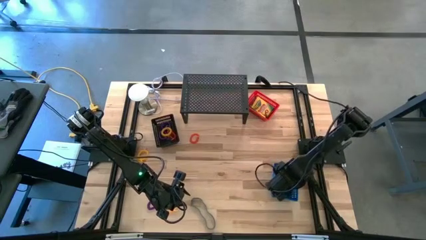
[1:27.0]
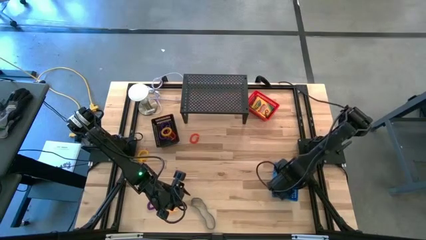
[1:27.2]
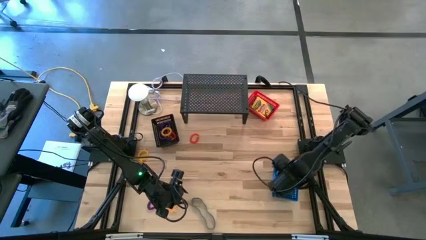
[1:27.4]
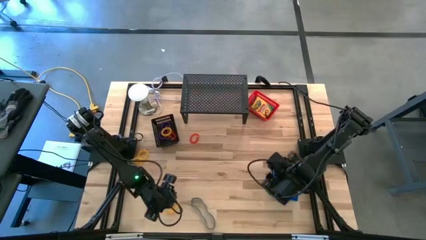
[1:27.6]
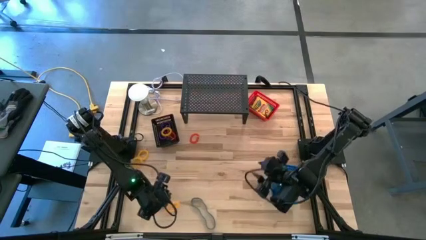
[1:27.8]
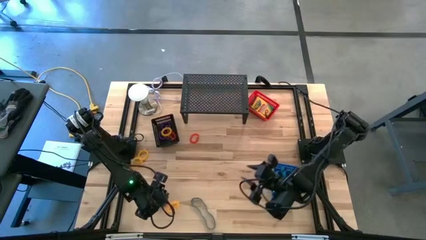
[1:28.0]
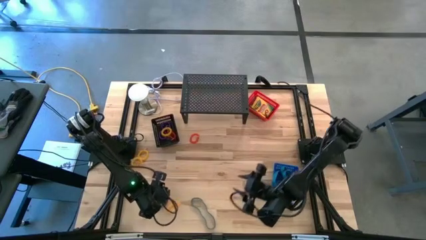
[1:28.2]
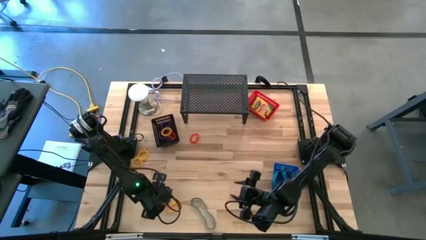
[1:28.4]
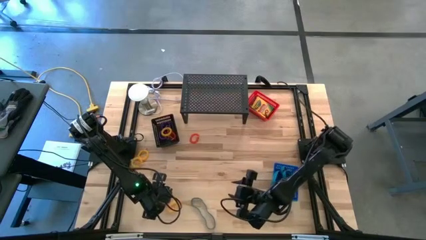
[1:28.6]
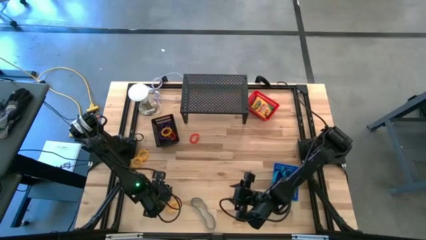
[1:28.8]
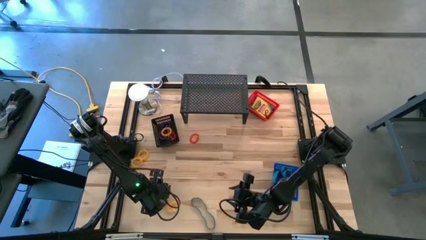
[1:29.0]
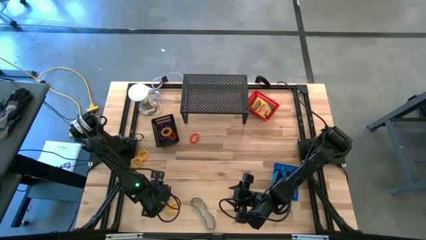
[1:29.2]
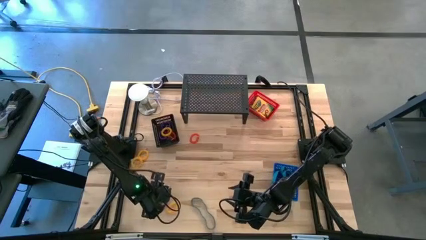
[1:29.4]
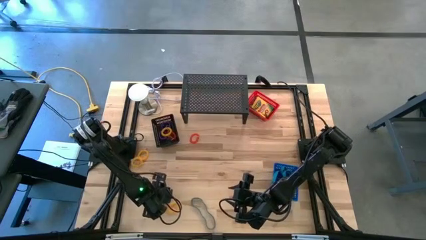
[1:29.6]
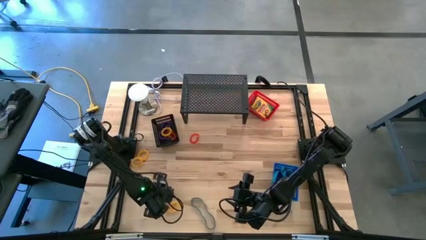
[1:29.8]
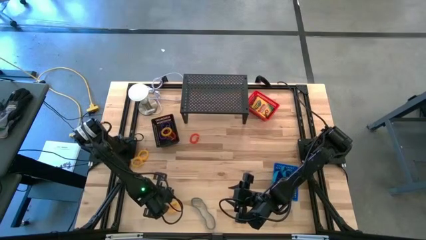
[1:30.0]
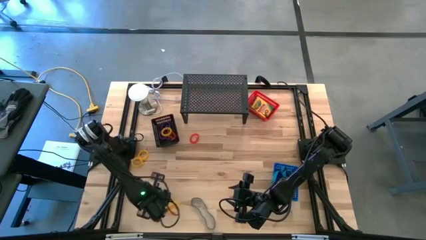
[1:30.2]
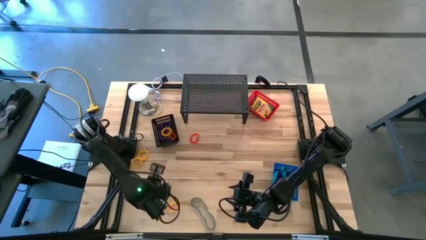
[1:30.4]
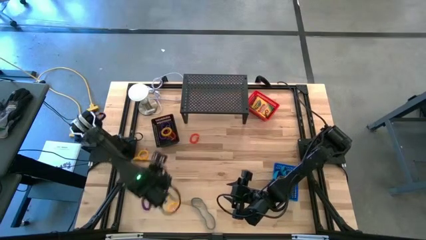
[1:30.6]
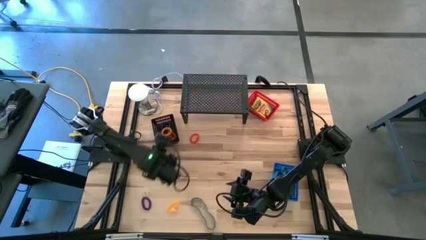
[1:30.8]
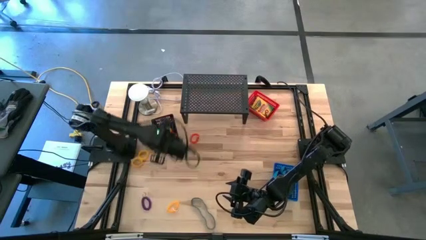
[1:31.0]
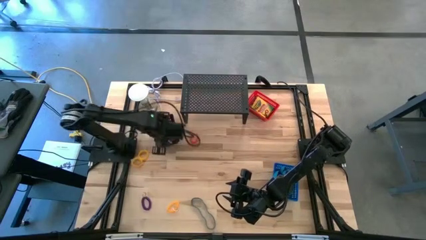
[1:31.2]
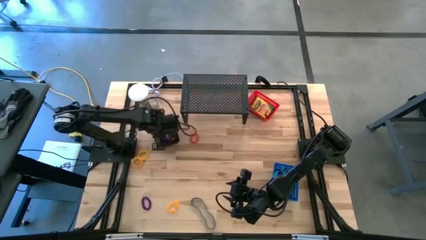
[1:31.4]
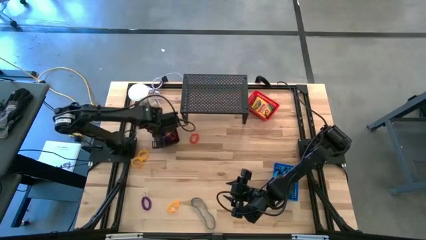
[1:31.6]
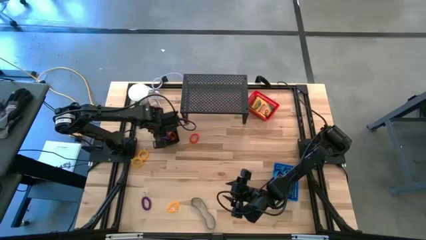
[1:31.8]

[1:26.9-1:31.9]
Task: Pick & Place Office Desk Supplies
Put the purple spring keychain into the black basket

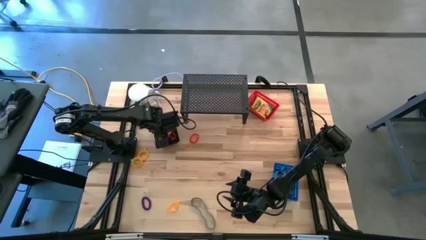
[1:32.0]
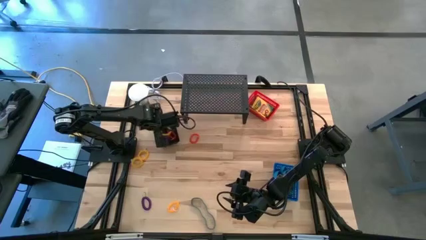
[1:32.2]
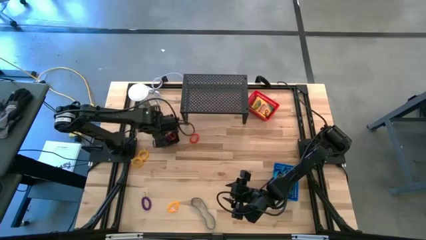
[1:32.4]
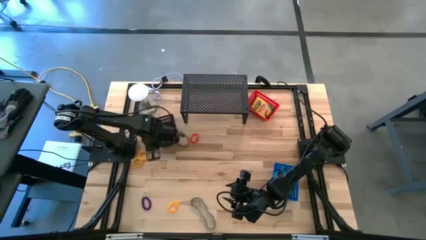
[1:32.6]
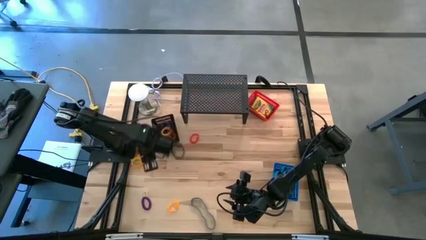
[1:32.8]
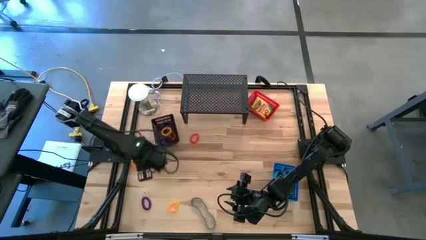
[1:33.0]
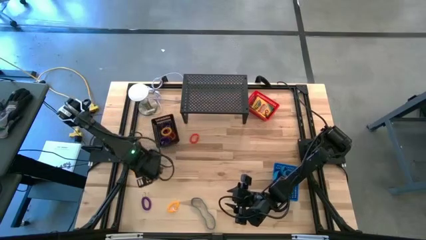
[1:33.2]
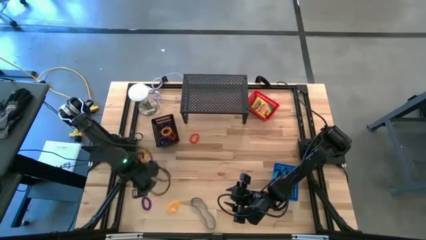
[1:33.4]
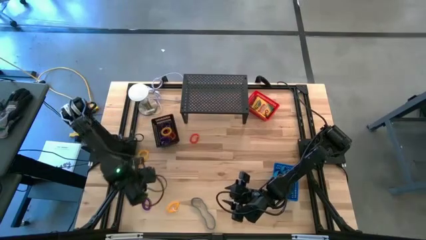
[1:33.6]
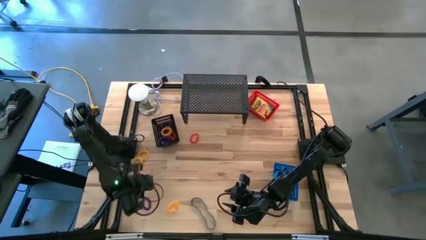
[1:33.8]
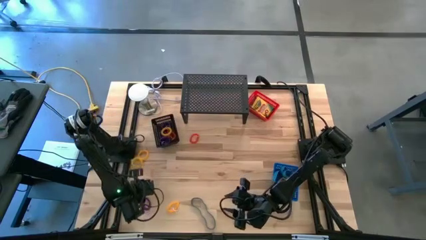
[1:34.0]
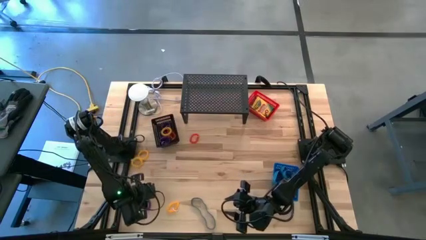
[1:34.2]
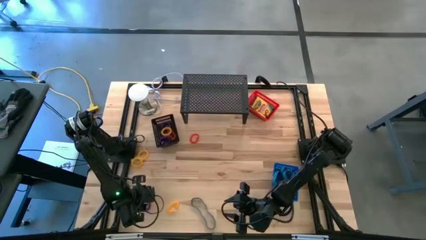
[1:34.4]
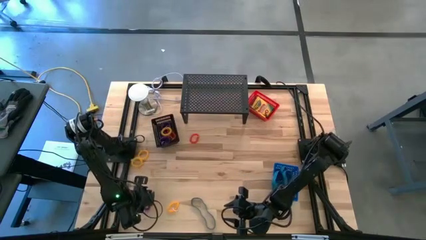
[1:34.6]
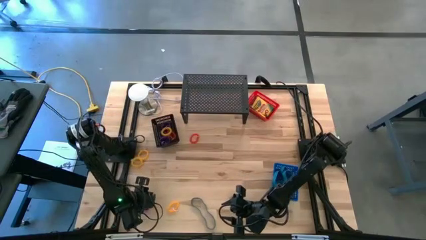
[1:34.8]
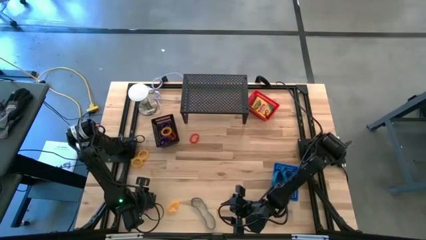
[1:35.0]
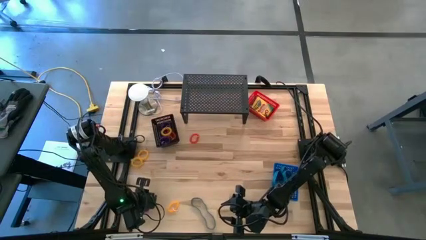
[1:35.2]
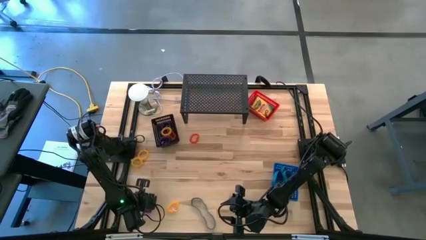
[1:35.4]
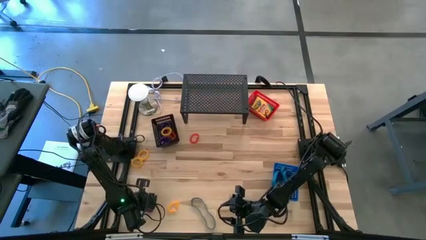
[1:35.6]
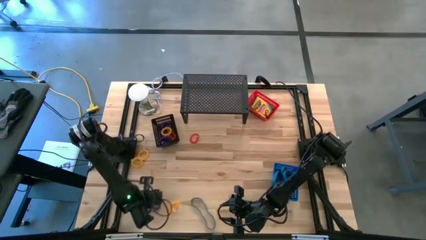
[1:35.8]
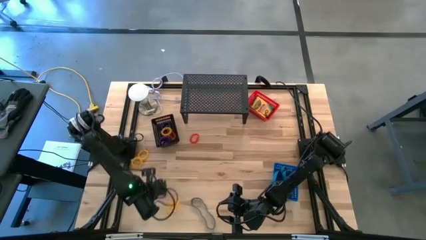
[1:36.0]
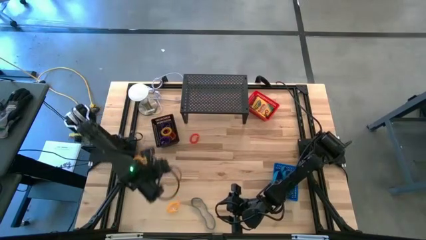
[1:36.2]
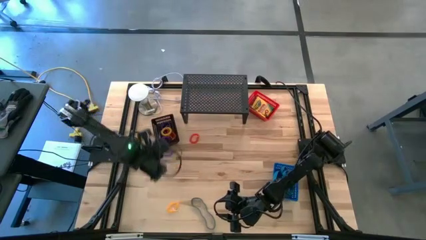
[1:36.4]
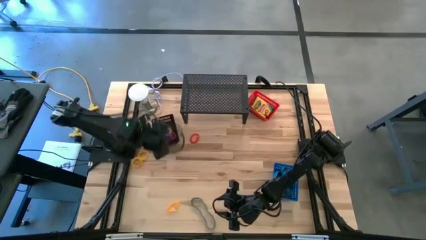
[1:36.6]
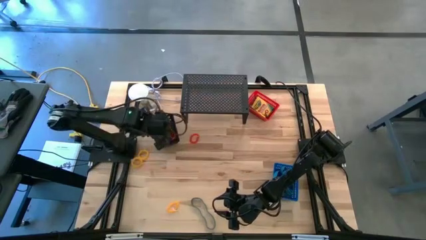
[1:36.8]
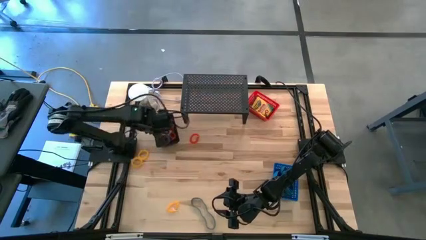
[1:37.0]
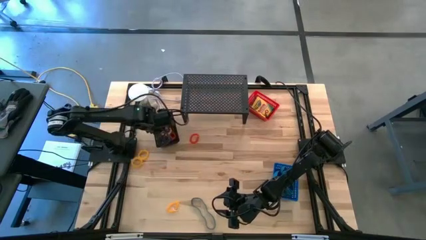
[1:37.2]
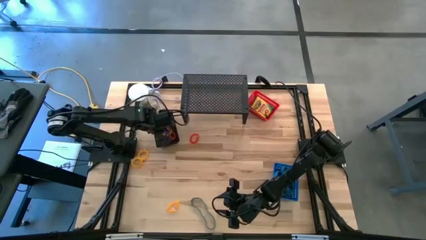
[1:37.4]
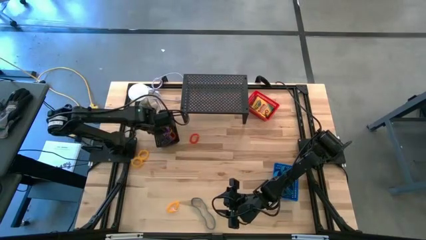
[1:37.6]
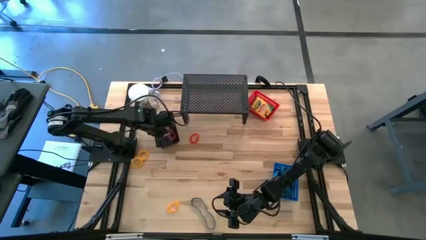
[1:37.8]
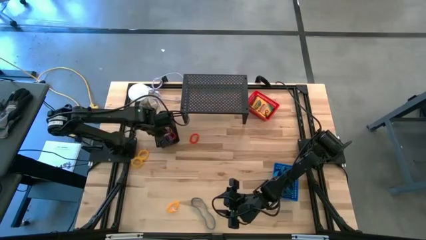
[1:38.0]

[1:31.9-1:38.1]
Put the purple spring keychain into the black basket

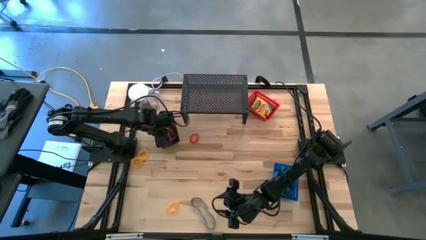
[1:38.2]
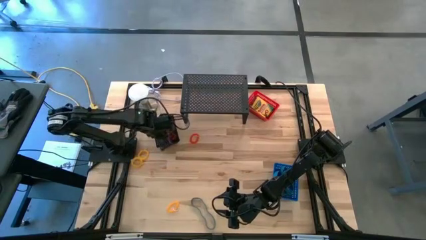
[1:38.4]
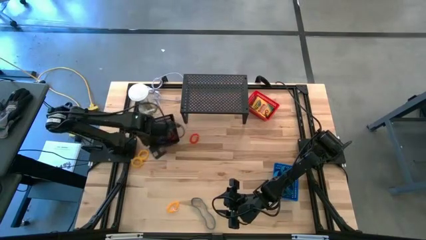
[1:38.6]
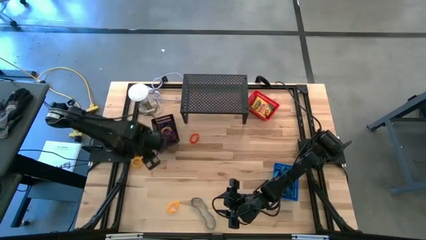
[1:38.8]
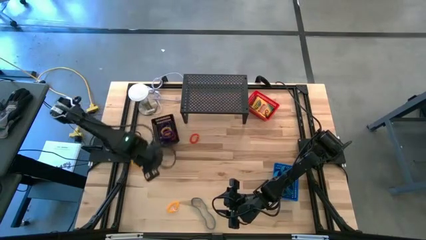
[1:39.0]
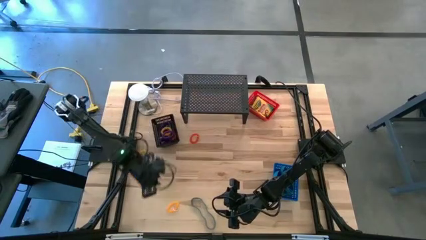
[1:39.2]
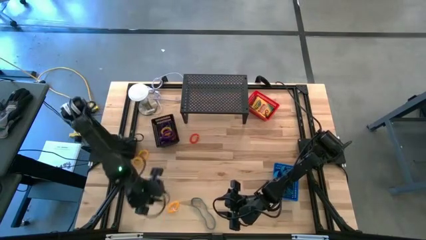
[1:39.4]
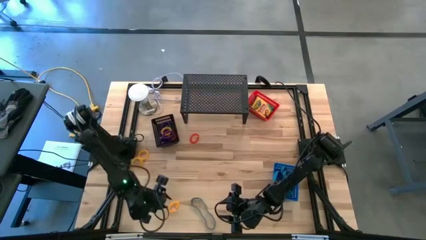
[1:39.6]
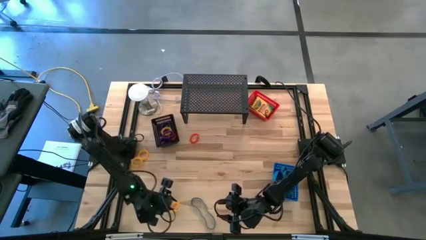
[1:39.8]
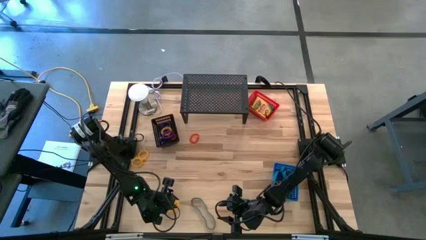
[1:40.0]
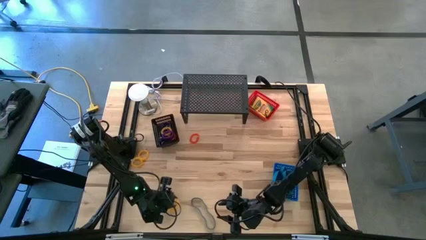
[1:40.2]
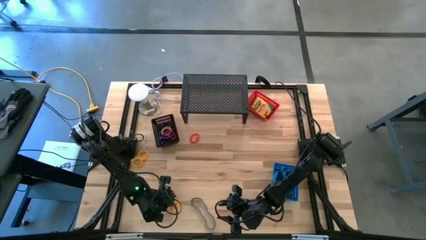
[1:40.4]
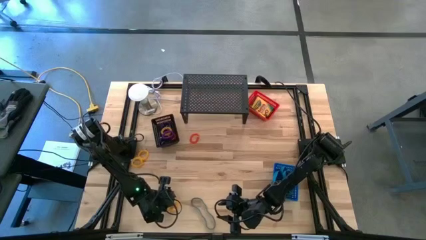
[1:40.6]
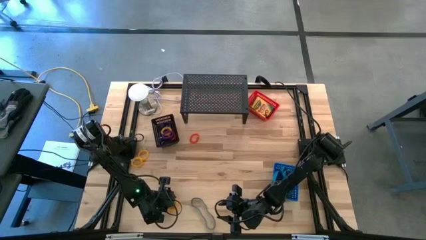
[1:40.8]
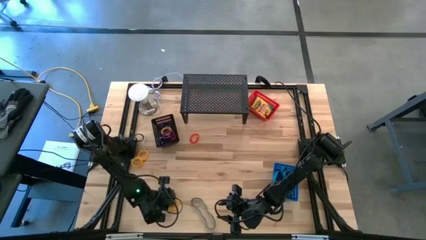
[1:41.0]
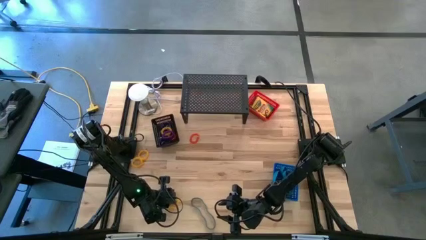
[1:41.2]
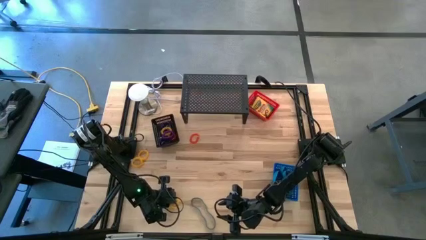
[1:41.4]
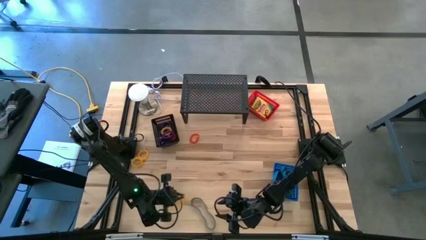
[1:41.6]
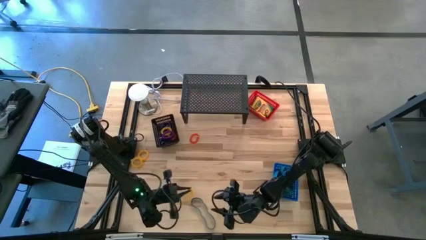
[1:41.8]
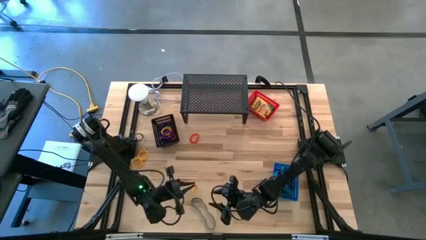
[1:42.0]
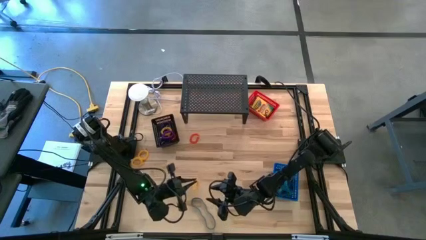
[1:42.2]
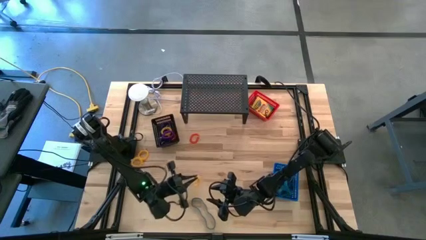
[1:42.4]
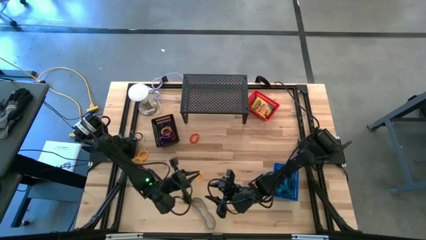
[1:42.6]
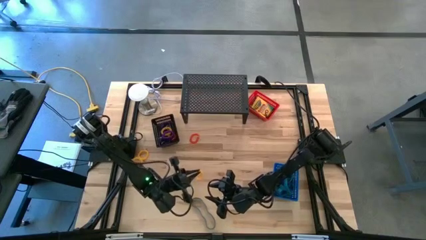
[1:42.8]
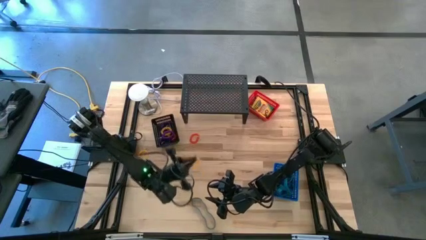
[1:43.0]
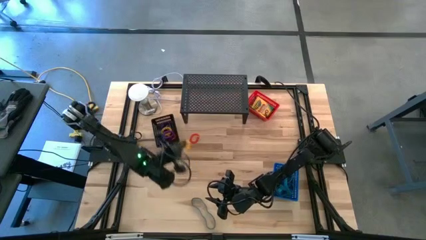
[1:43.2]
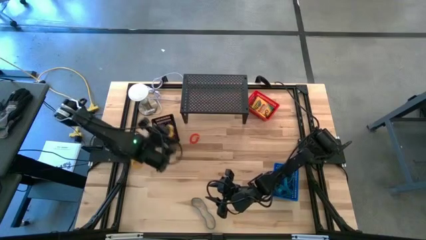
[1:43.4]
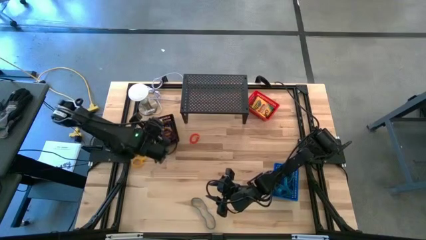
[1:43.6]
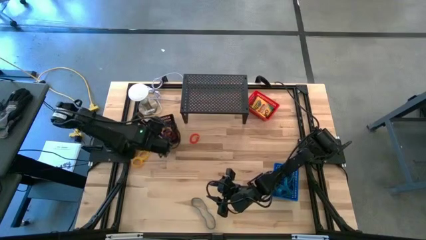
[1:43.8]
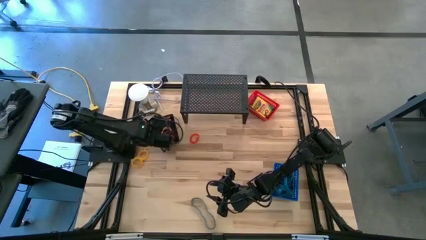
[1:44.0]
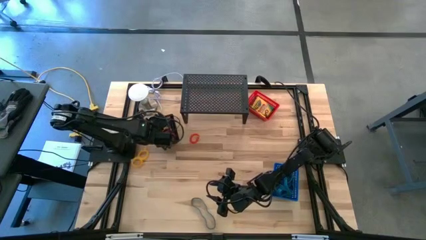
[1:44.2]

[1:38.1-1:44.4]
Put the yellow spring keychain into the black basket
